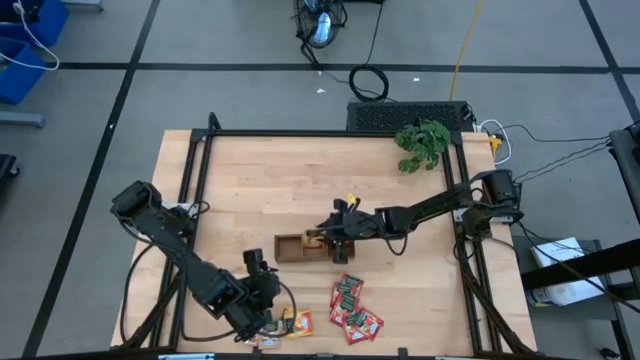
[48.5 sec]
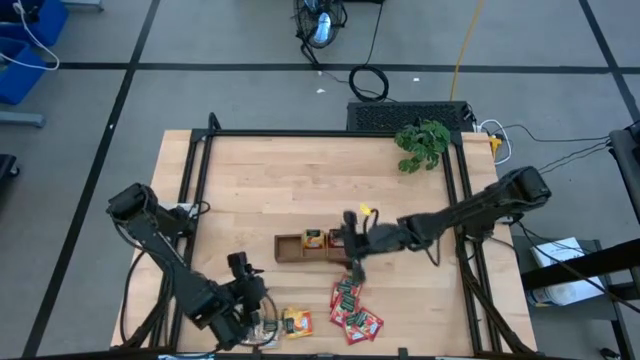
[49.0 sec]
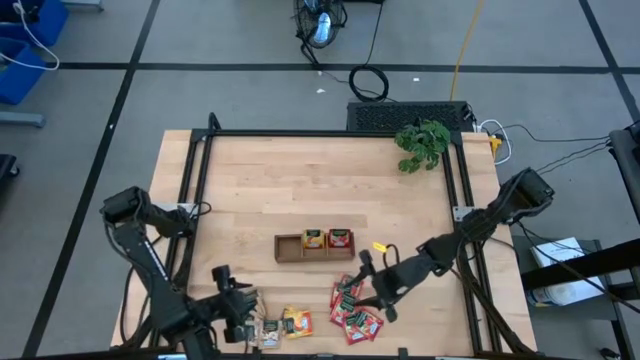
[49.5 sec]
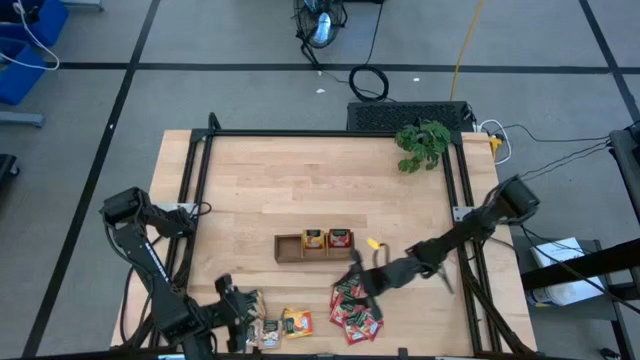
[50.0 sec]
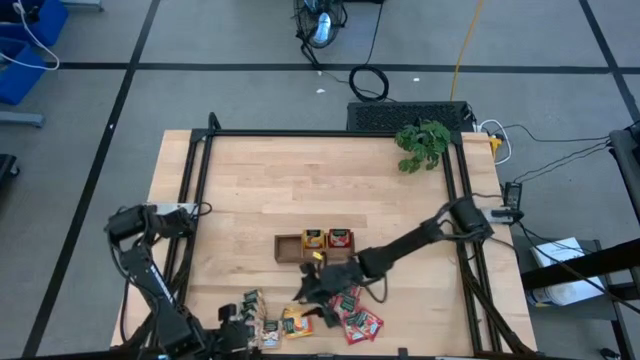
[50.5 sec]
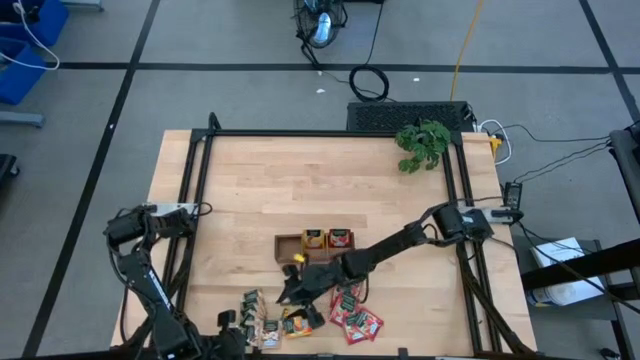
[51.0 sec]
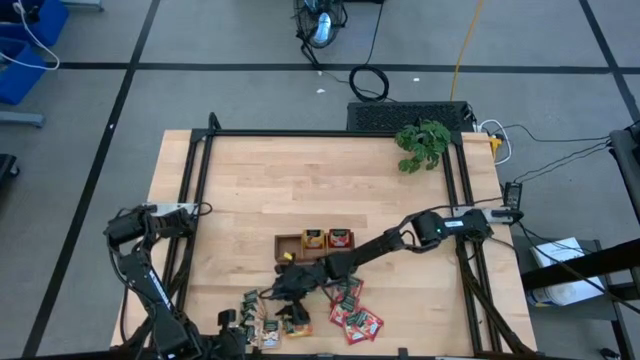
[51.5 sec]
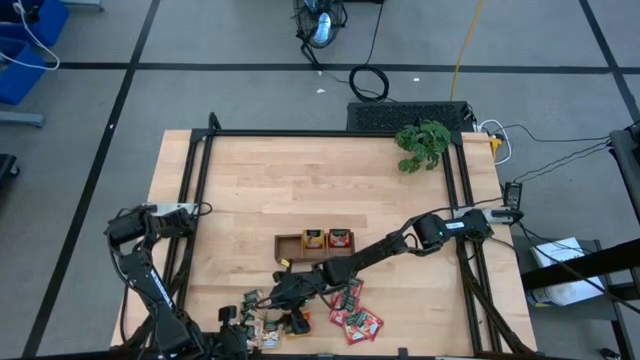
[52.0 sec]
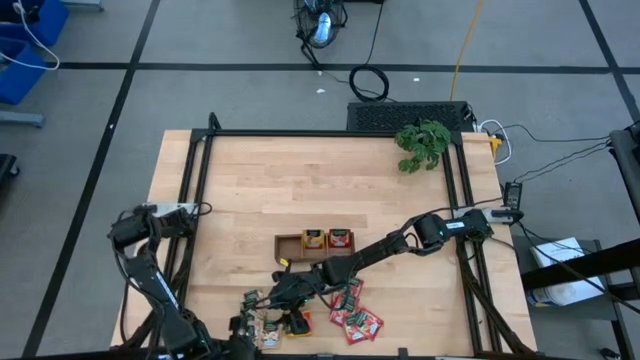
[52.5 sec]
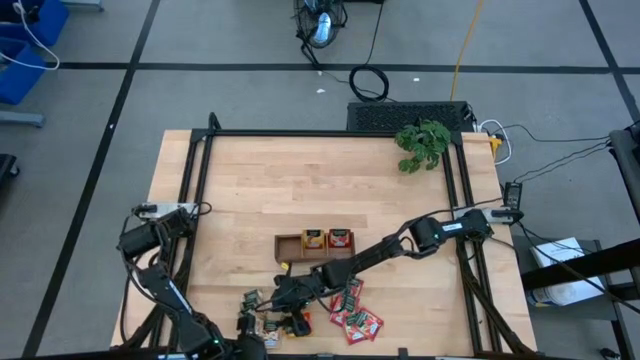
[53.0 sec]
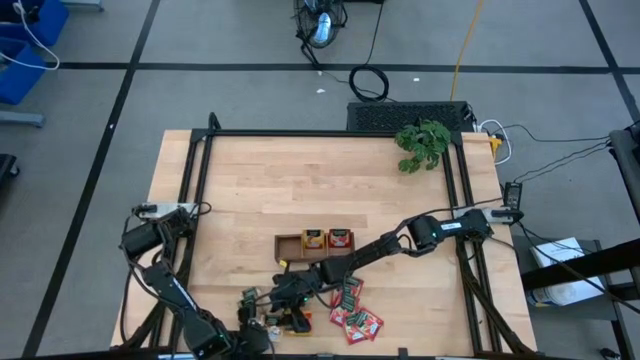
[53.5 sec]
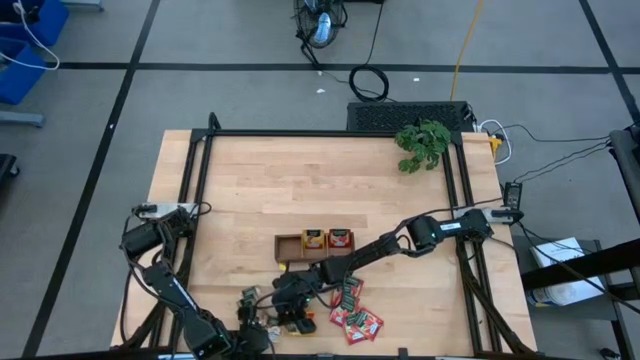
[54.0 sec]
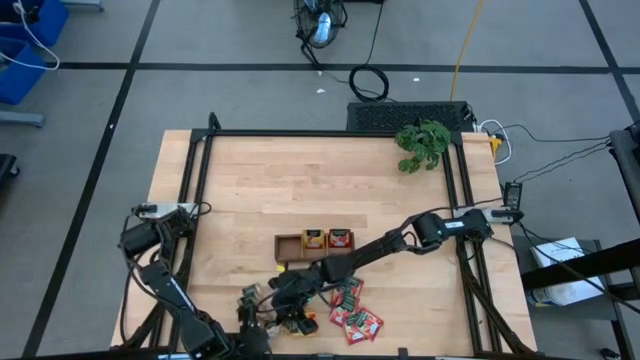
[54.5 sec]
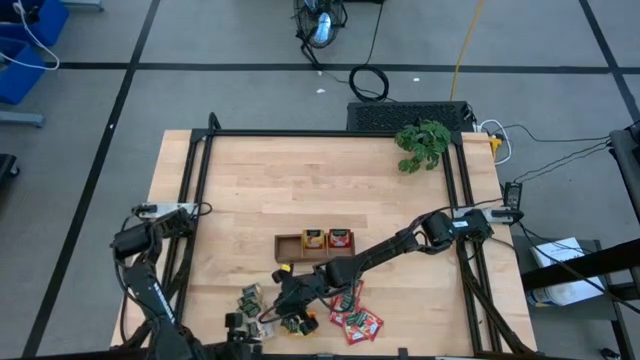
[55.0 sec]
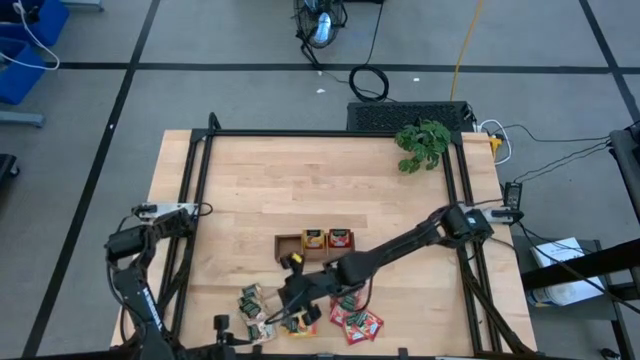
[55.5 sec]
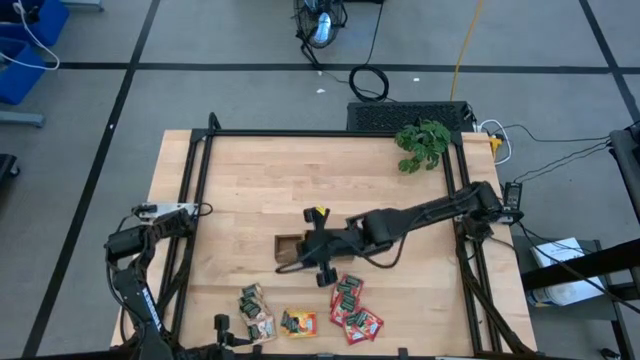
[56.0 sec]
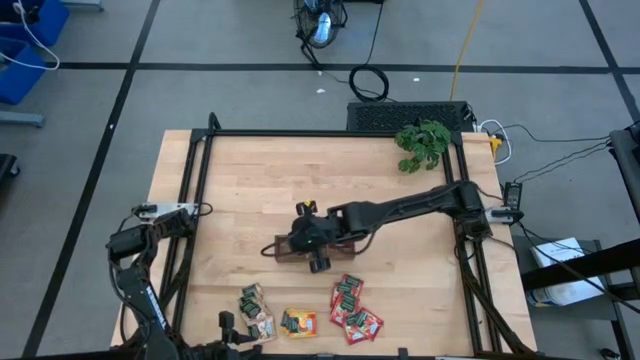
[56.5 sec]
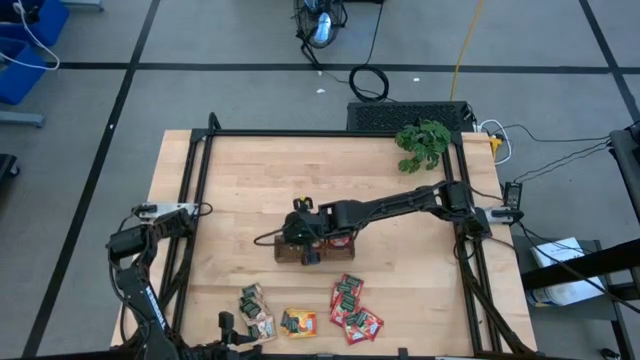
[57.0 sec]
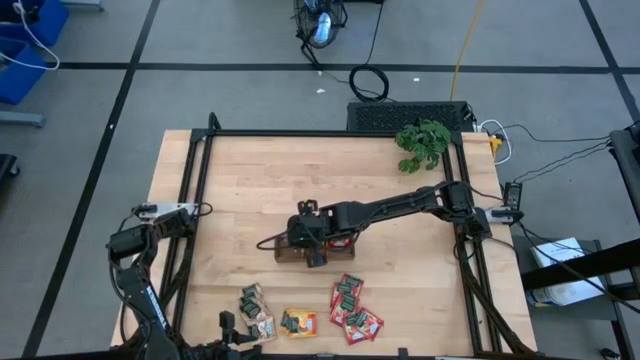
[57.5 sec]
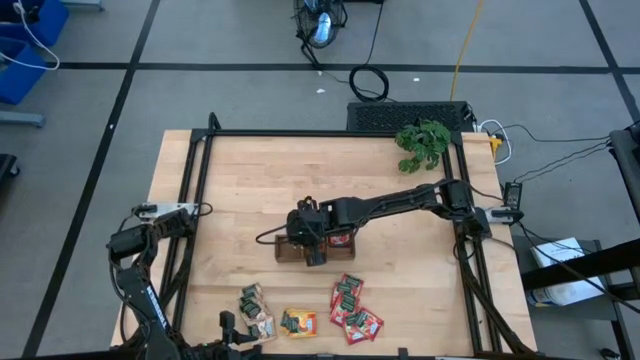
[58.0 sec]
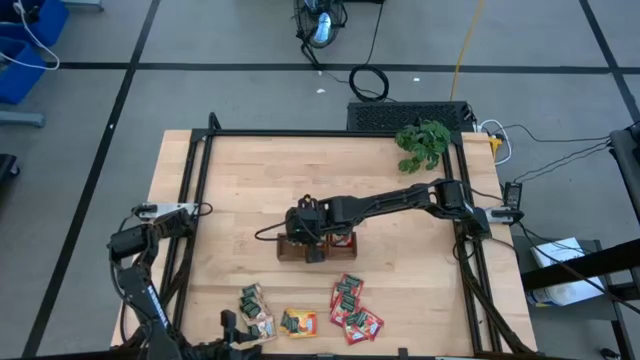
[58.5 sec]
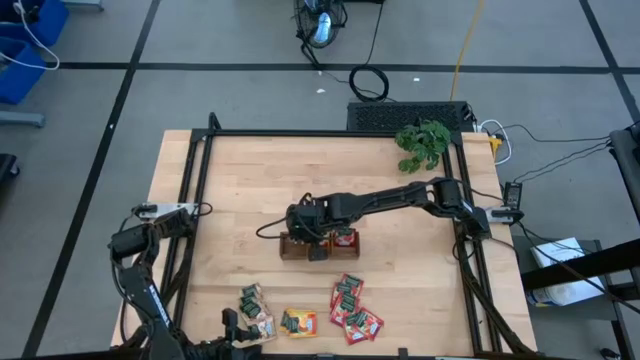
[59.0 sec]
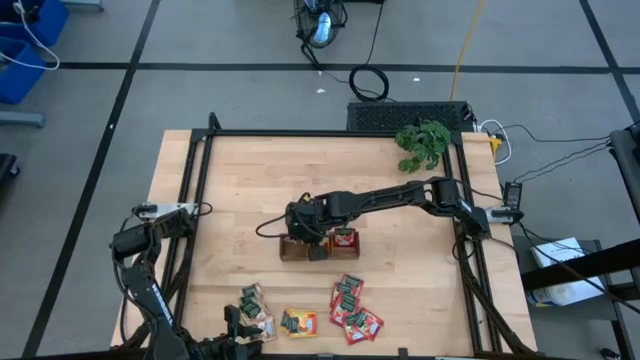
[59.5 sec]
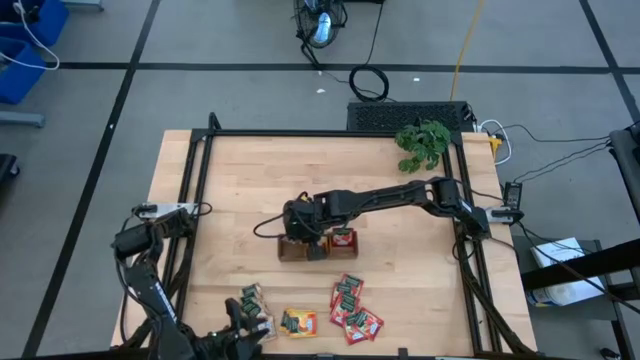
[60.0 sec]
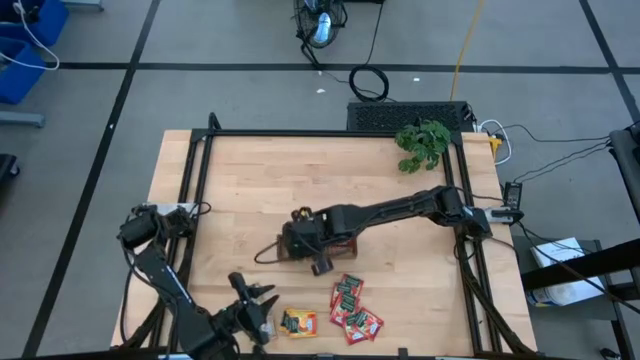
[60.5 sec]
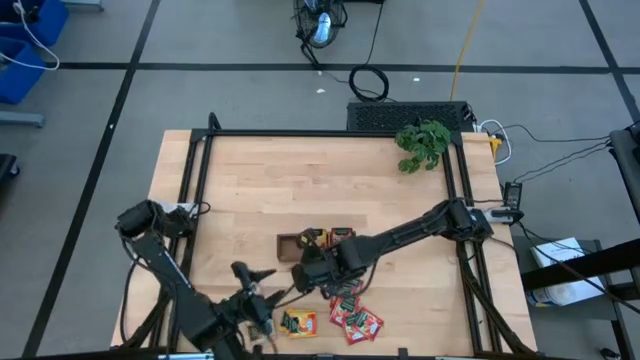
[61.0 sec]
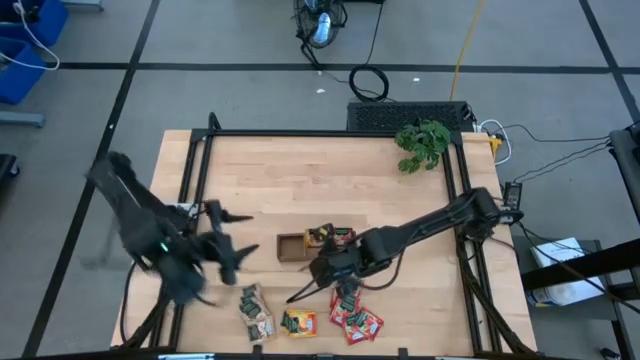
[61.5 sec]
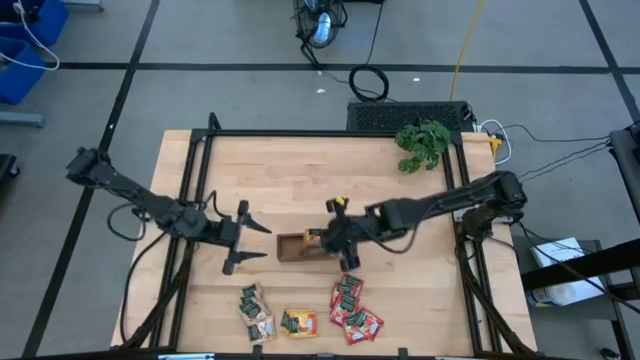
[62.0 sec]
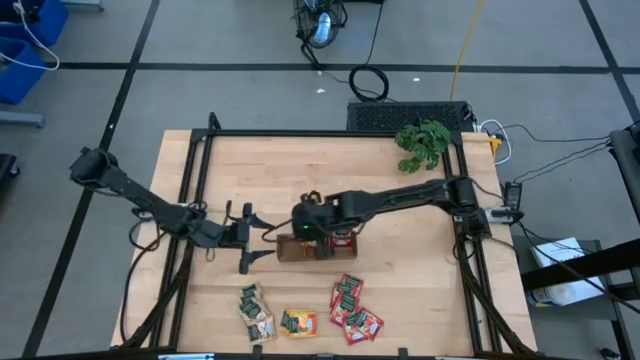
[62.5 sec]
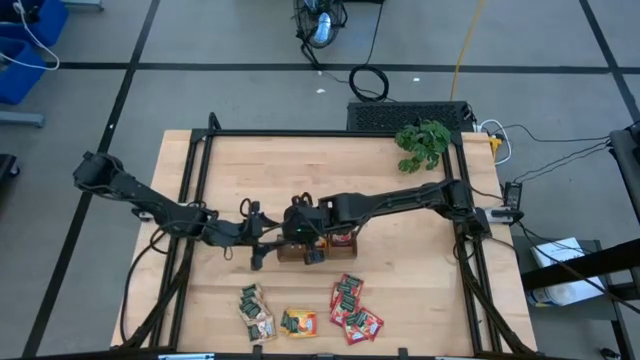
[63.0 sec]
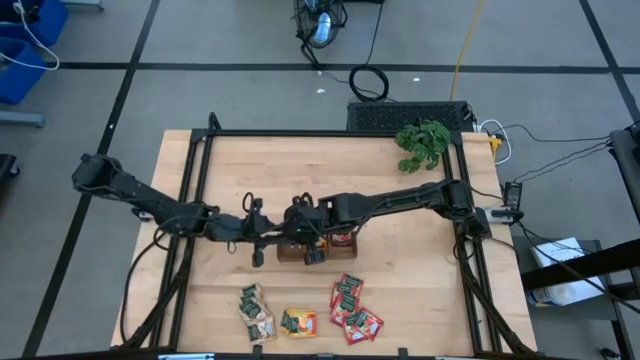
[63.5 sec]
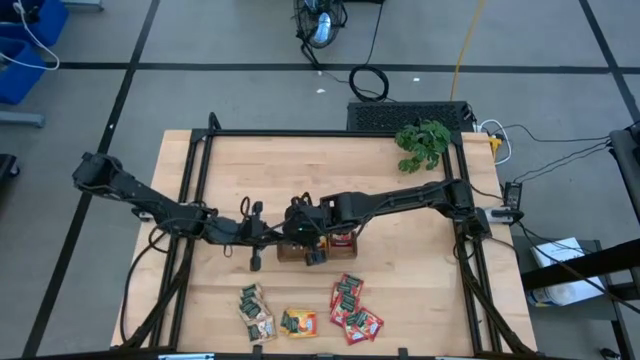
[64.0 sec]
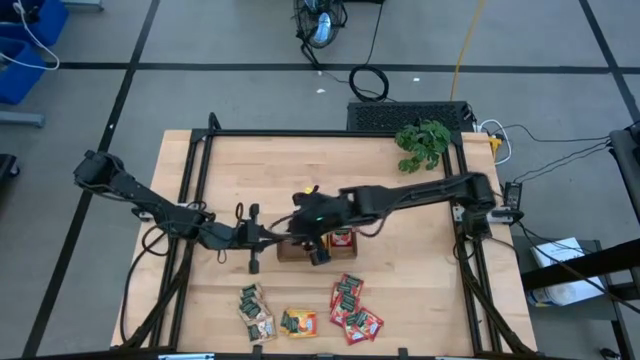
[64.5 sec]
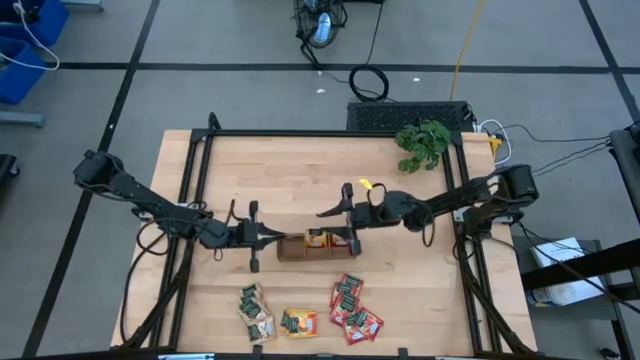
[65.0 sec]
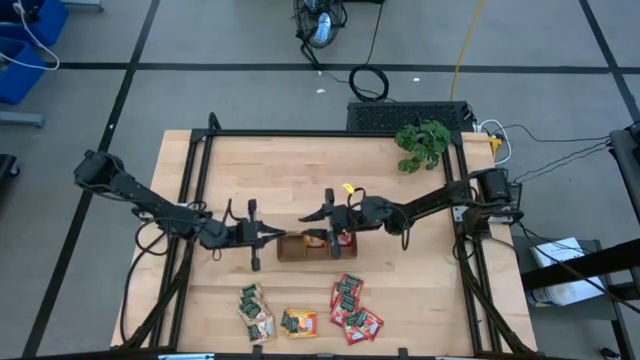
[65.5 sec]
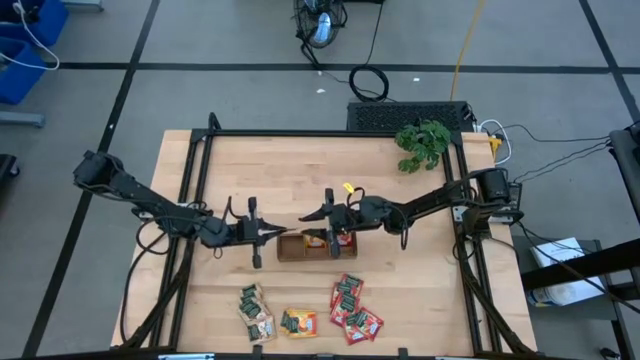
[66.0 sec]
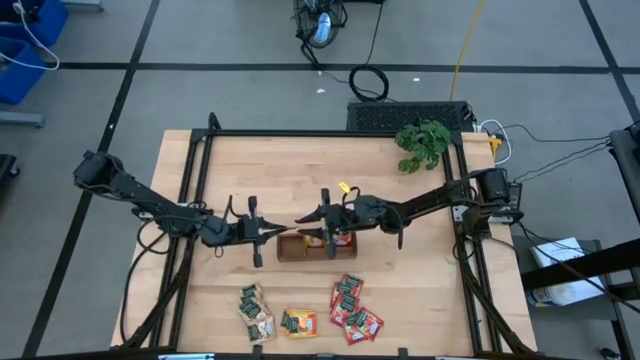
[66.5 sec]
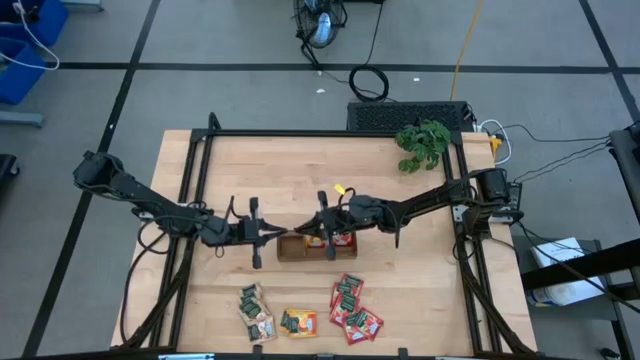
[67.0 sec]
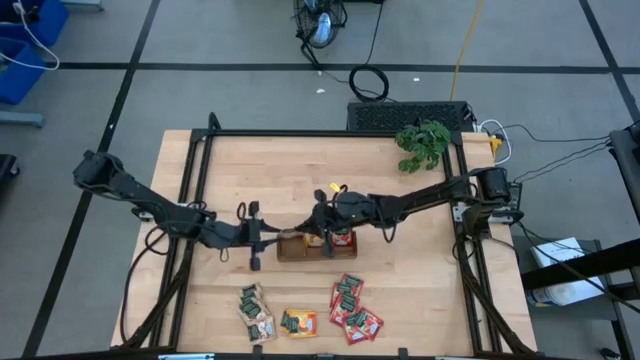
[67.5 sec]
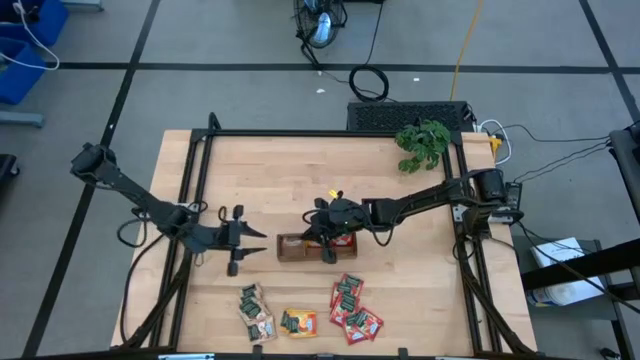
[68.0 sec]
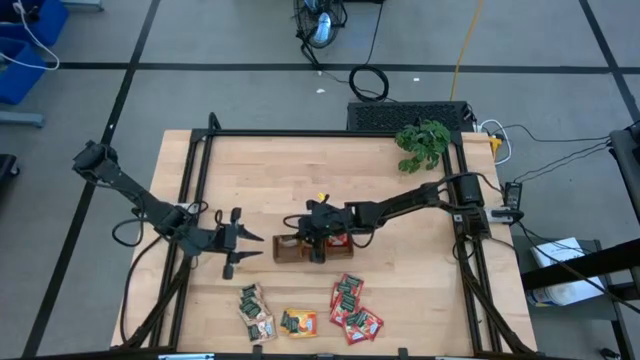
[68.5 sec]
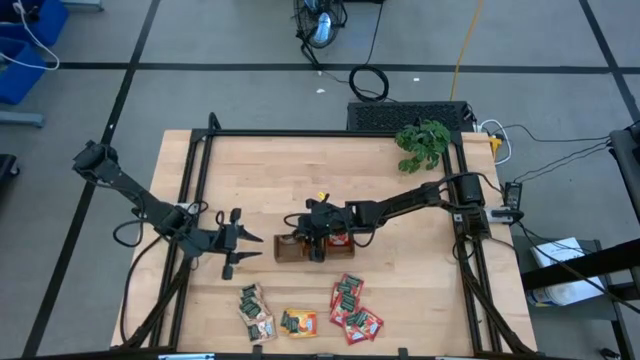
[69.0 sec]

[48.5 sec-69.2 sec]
Task: Pick & Place Tea
Put the brown tea bag into the left section of the wooden organizer

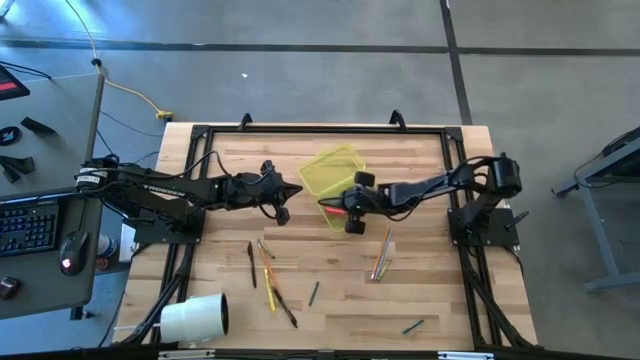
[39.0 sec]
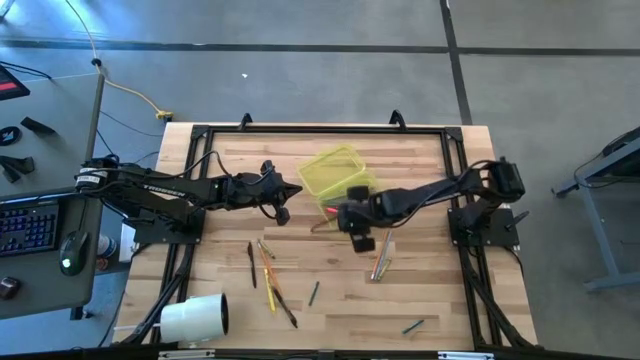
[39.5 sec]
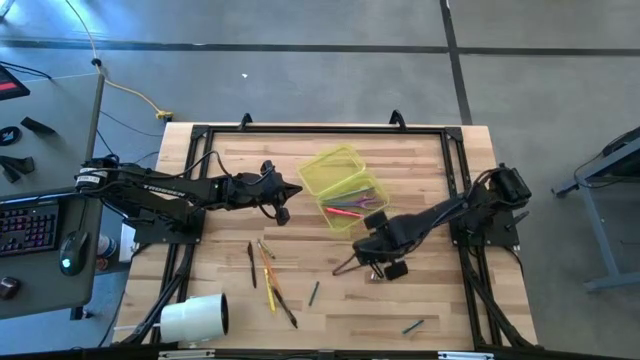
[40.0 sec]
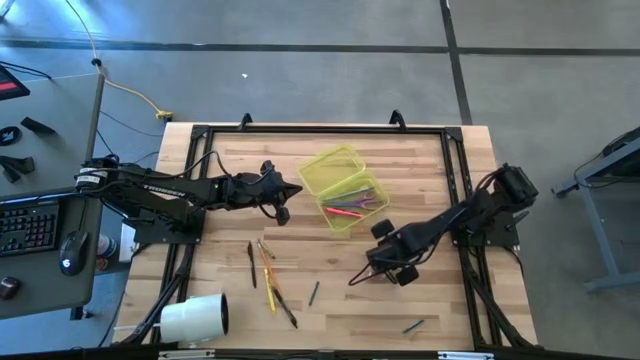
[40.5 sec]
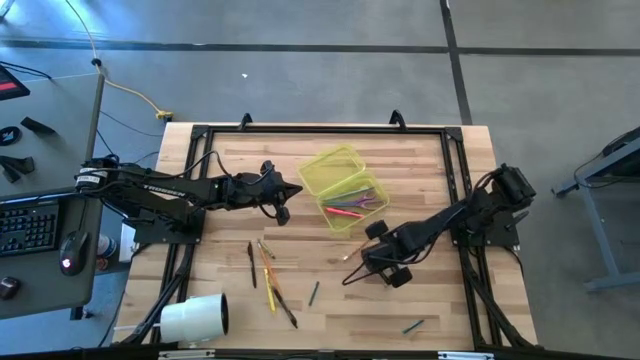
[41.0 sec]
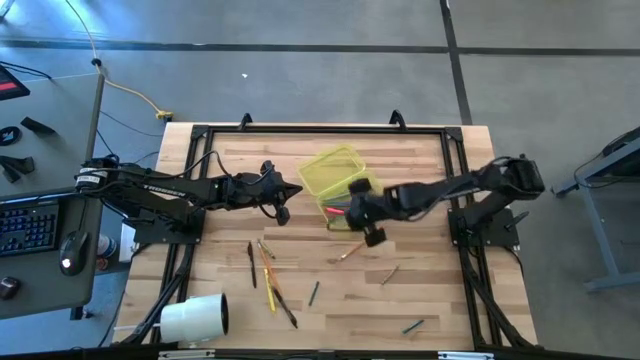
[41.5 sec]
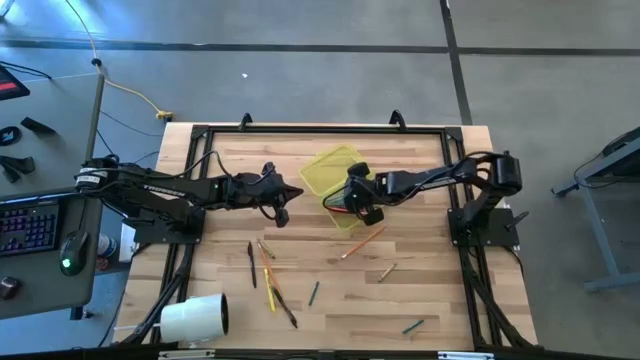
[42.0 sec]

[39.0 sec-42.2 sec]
Task: Pick & place school supplies into a supply box
Put the blue pencil into the supply box
